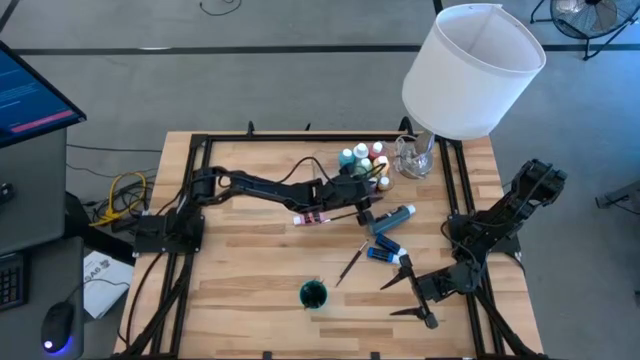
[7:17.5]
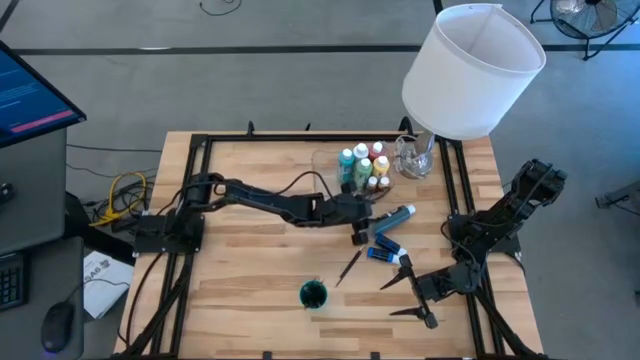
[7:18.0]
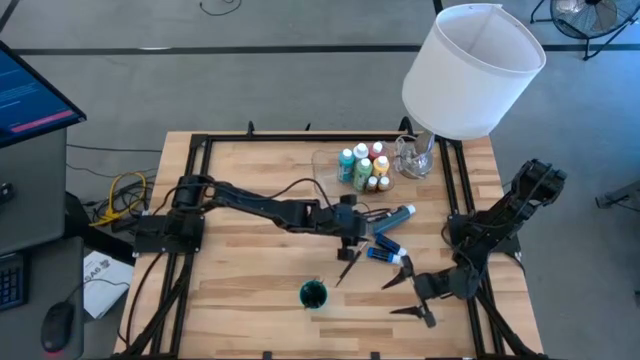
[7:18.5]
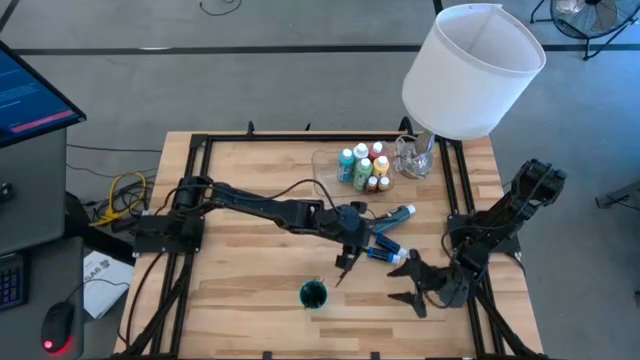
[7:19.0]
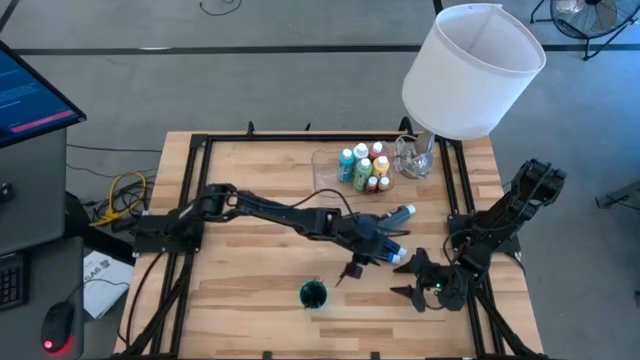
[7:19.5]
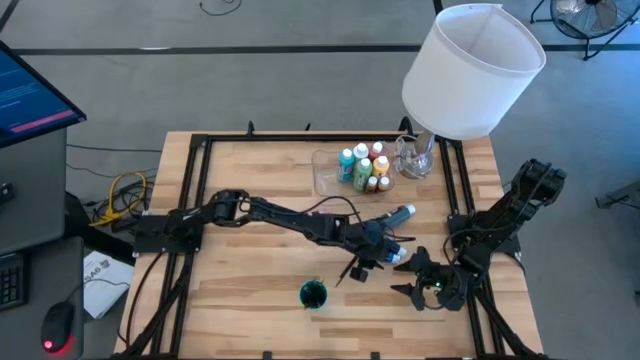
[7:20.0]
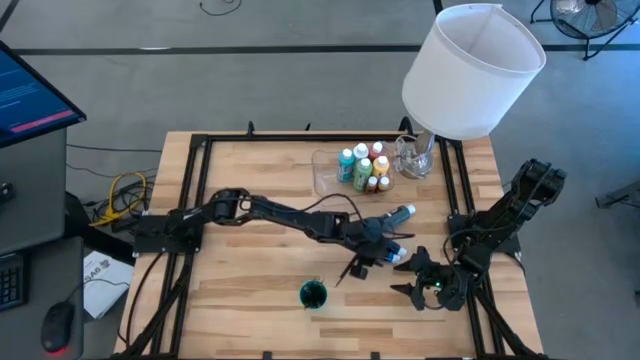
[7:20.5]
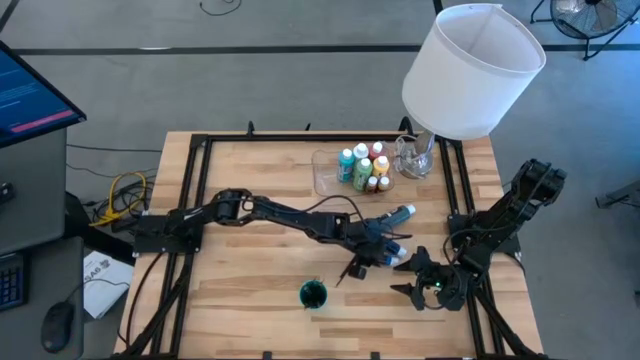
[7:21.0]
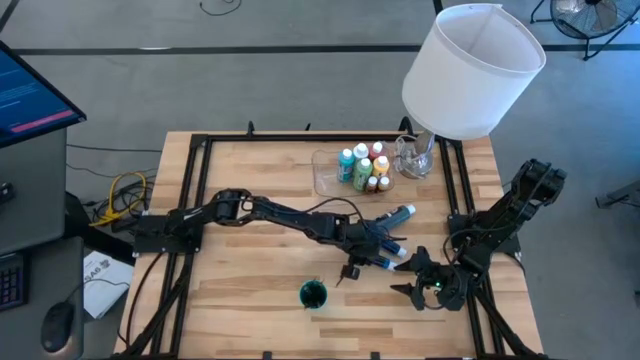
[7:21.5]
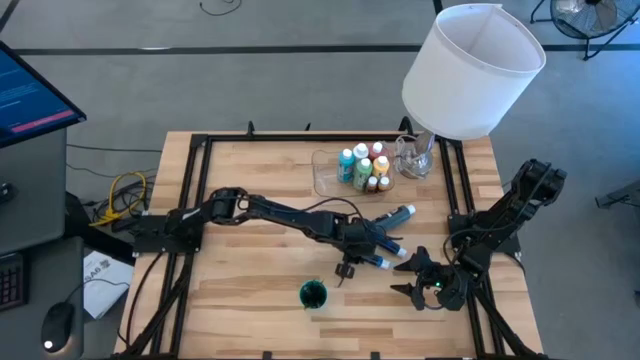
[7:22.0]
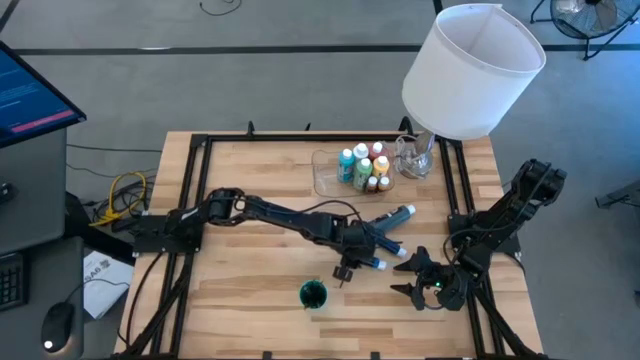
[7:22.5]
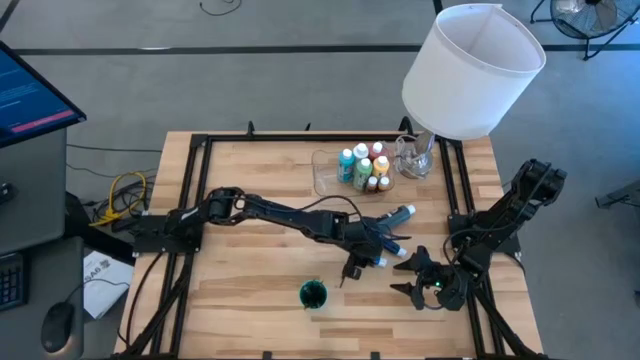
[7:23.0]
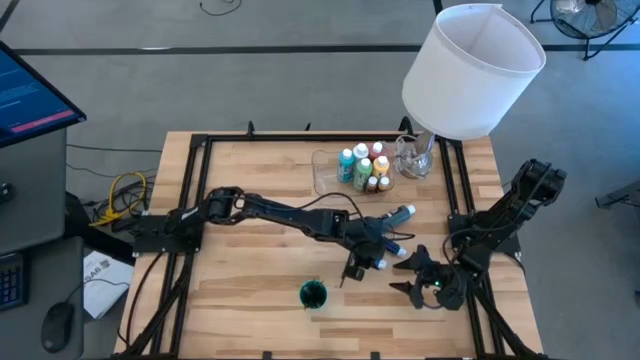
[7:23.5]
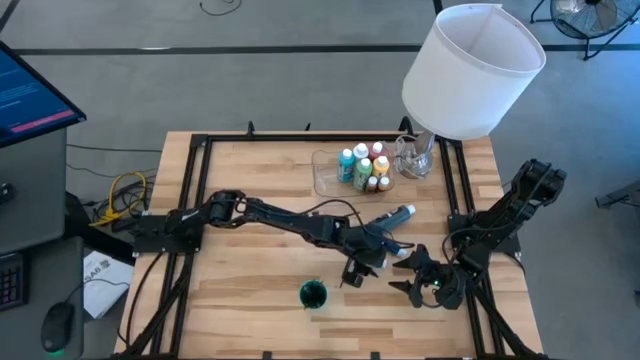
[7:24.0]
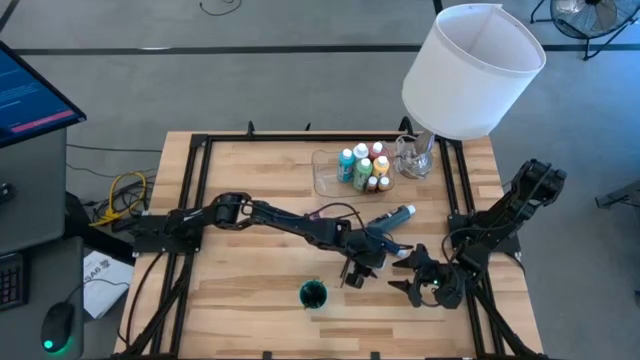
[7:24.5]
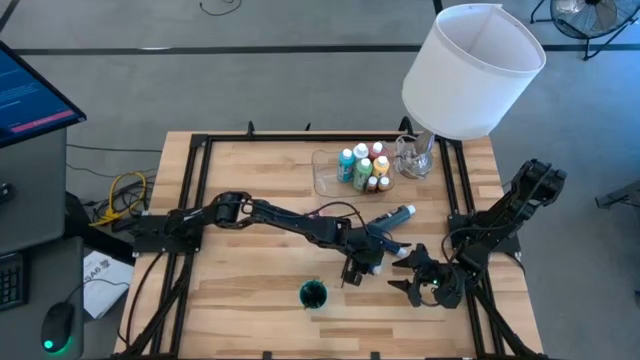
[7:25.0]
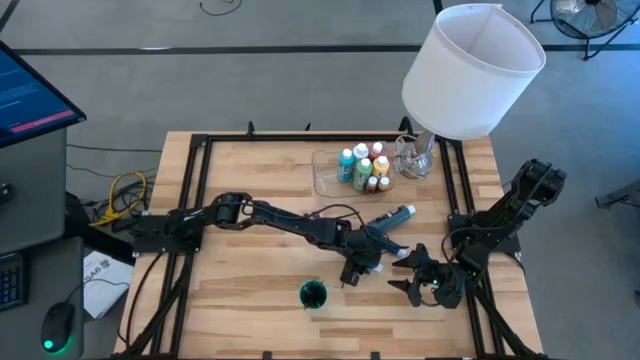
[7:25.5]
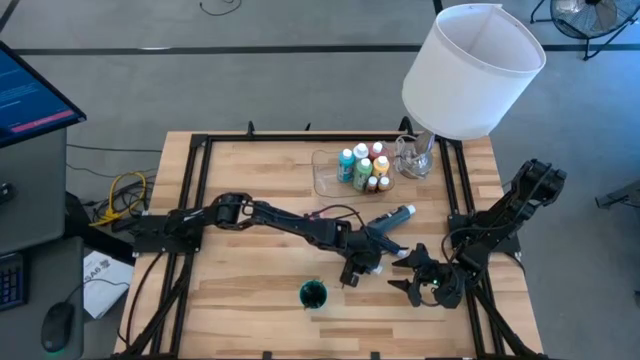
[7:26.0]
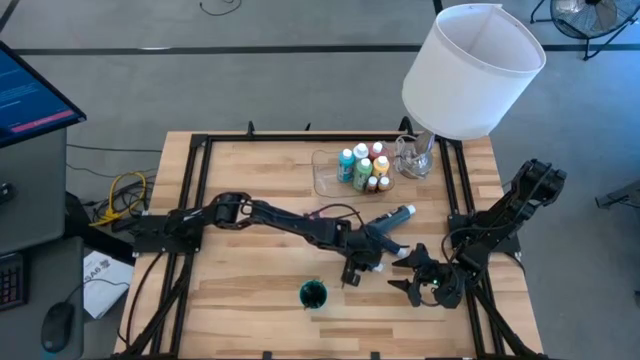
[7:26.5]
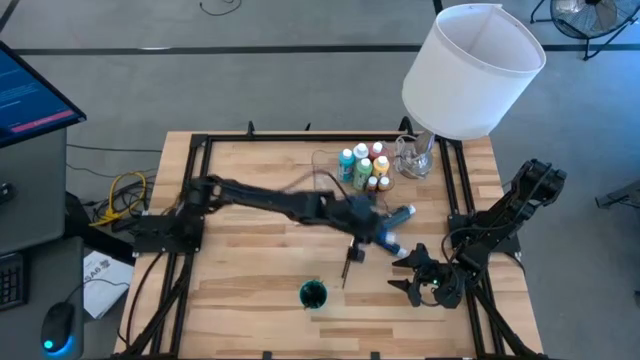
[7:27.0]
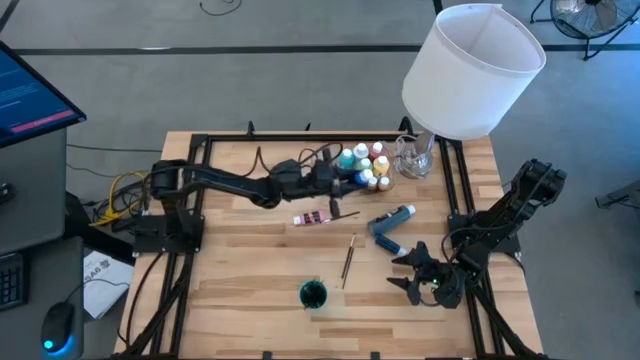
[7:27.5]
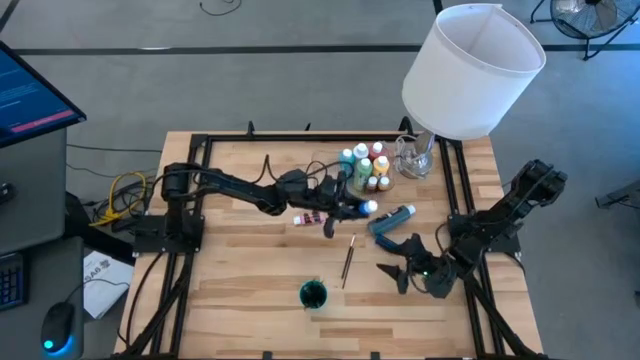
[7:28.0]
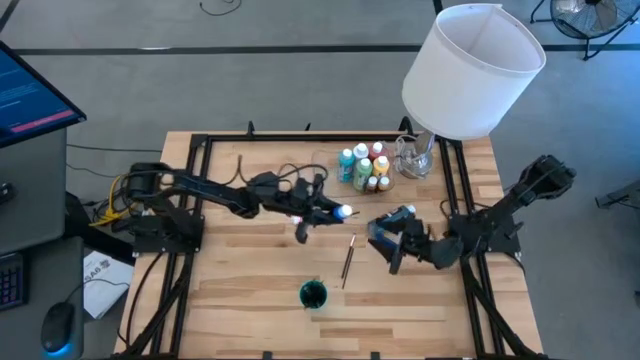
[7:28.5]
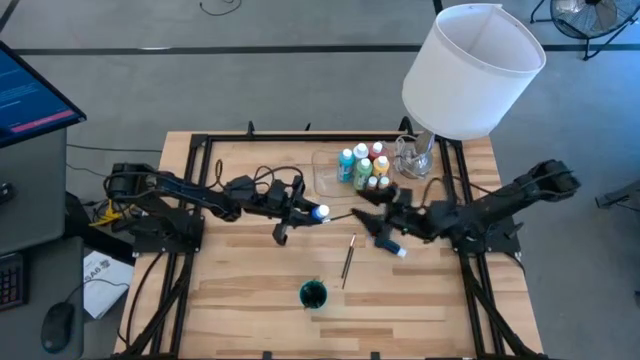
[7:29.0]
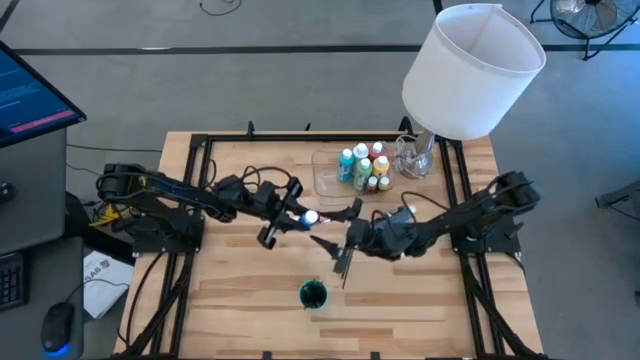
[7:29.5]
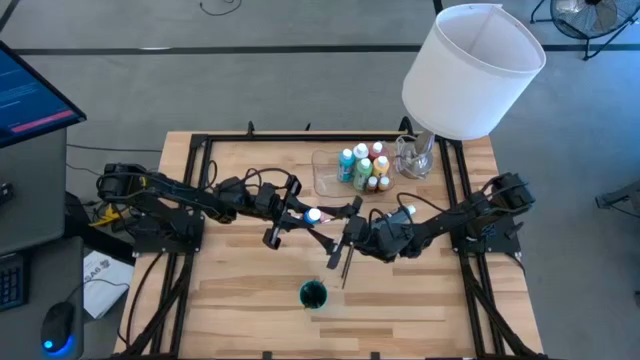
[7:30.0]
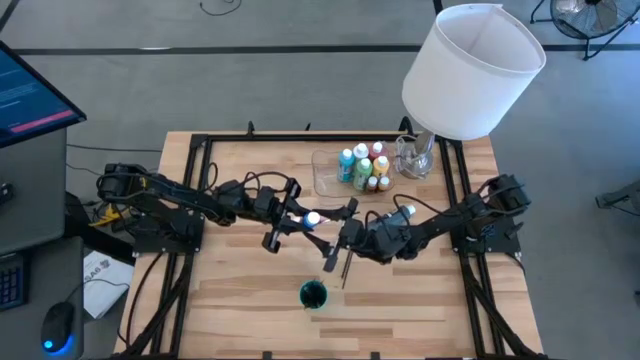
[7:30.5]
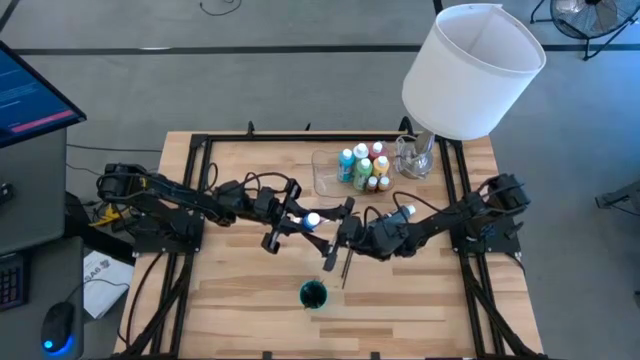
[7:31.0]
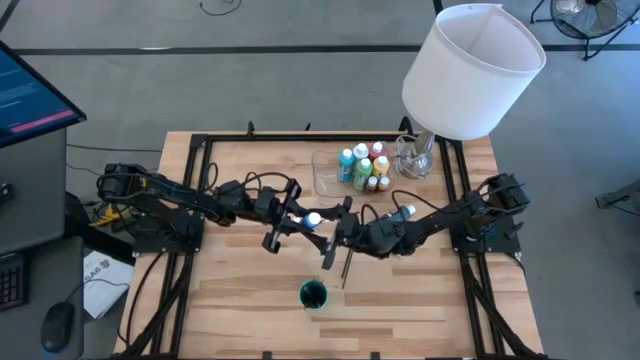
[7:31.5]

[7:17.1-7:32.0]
Task: Pick & Place Paint Supplies
Put the small blue paint bottle into the transparent bin
